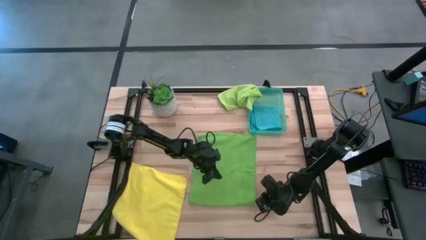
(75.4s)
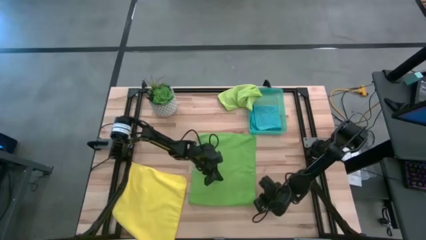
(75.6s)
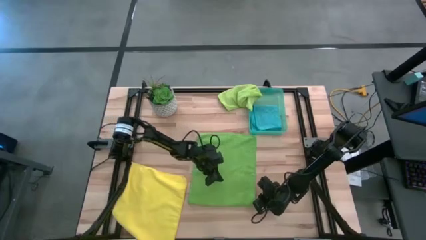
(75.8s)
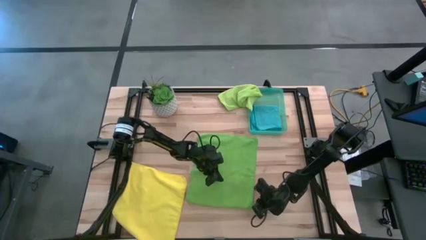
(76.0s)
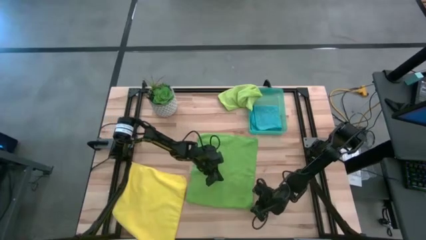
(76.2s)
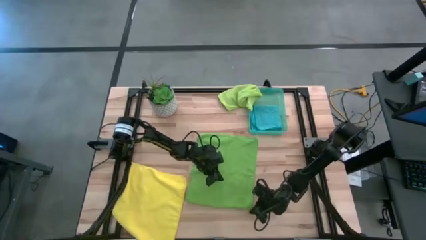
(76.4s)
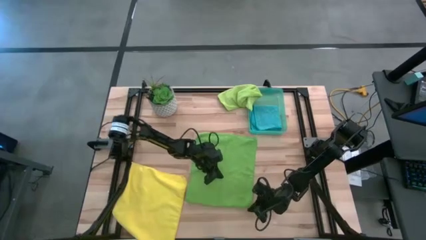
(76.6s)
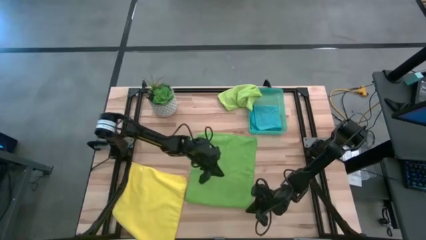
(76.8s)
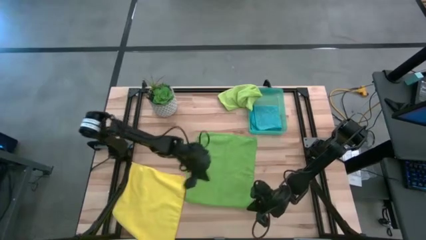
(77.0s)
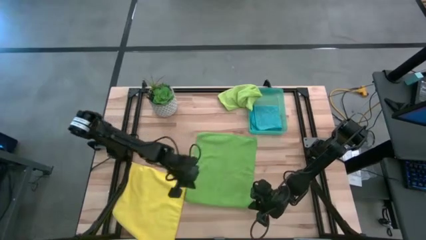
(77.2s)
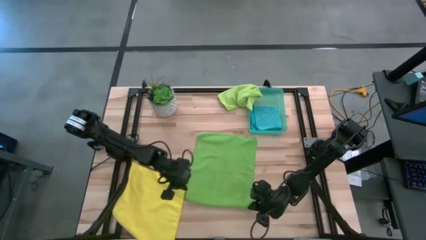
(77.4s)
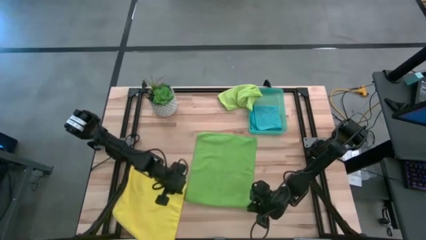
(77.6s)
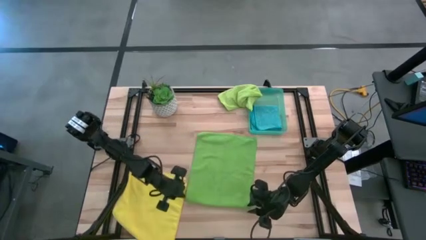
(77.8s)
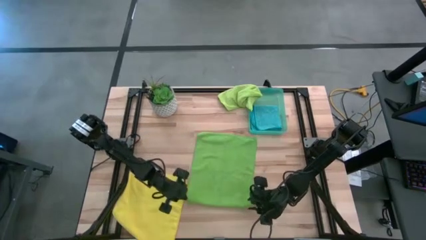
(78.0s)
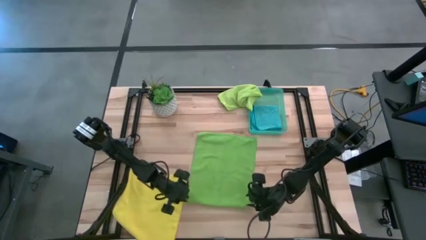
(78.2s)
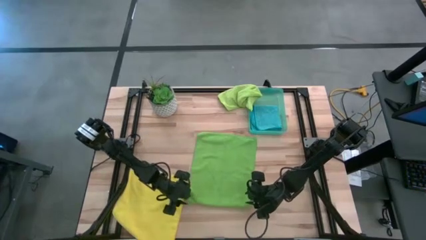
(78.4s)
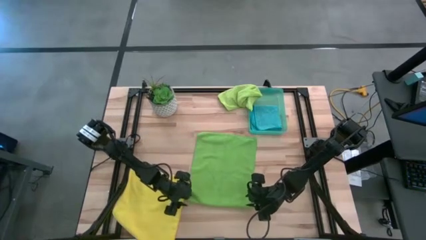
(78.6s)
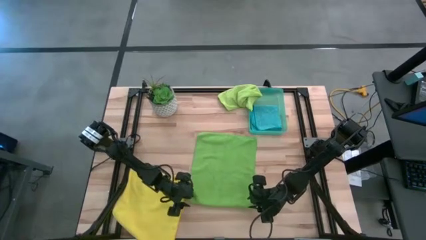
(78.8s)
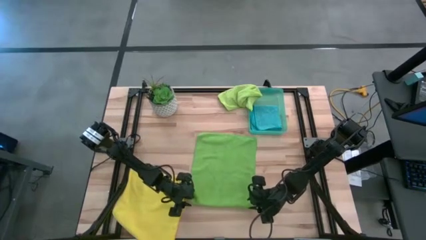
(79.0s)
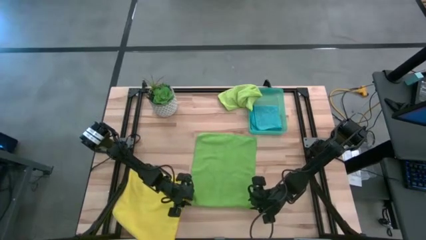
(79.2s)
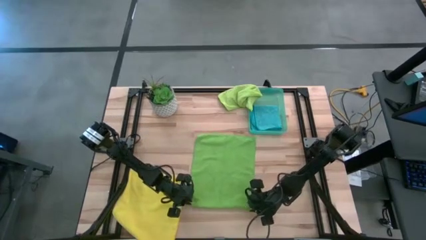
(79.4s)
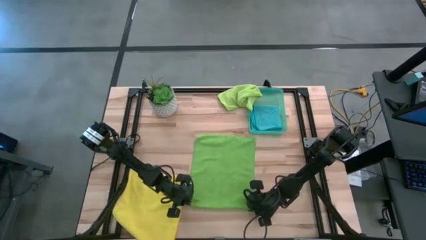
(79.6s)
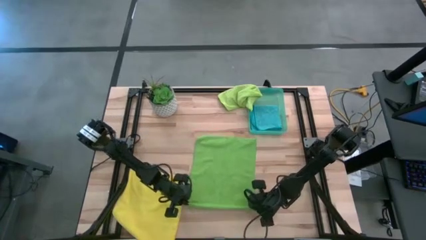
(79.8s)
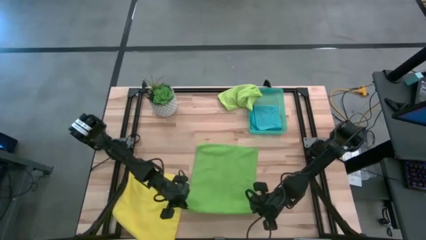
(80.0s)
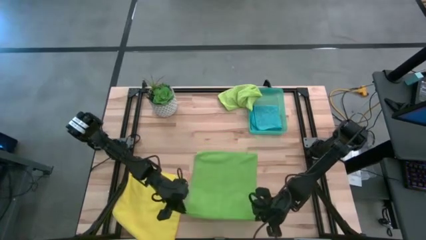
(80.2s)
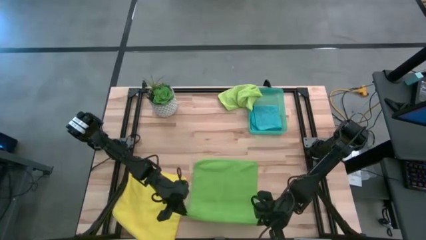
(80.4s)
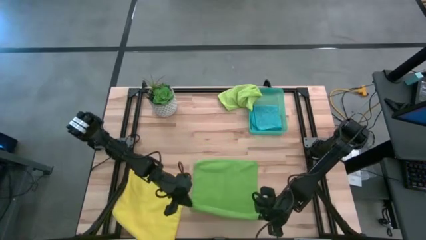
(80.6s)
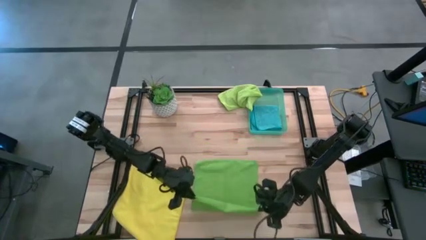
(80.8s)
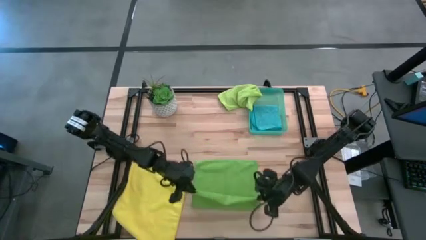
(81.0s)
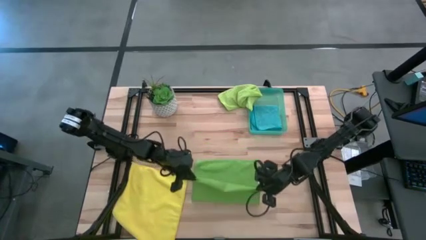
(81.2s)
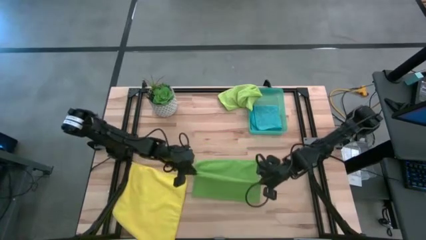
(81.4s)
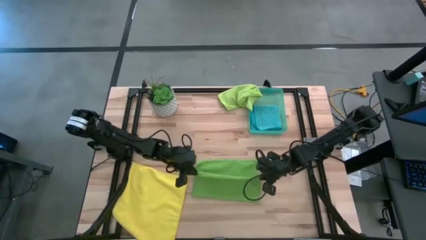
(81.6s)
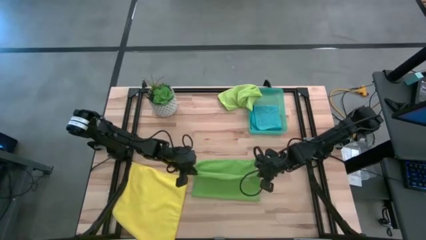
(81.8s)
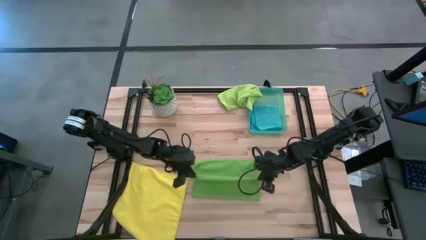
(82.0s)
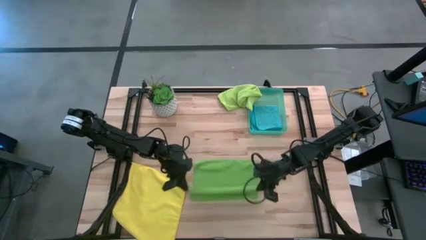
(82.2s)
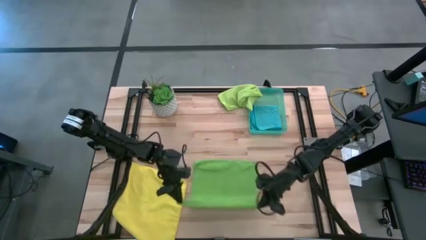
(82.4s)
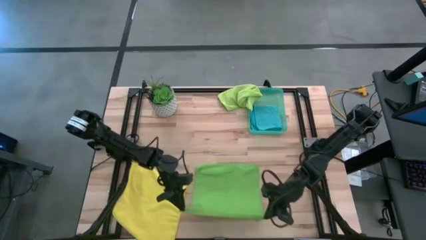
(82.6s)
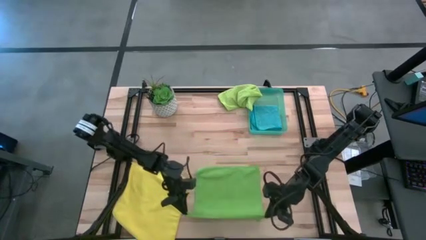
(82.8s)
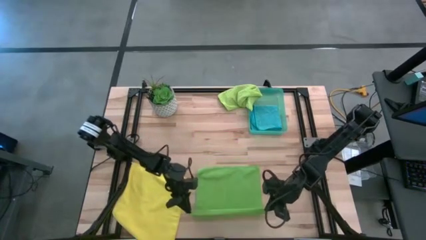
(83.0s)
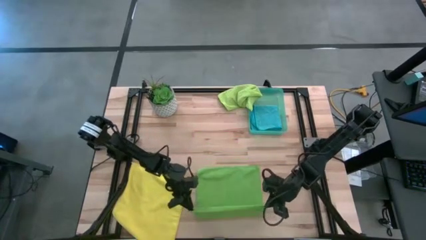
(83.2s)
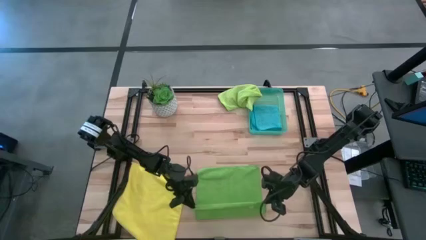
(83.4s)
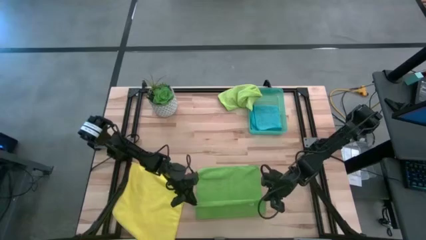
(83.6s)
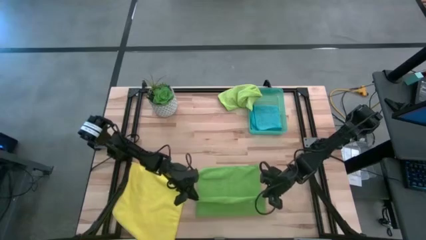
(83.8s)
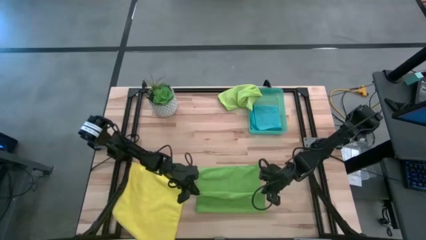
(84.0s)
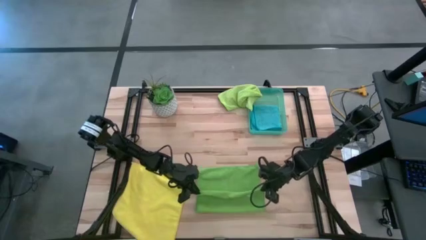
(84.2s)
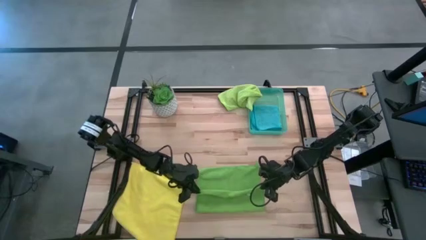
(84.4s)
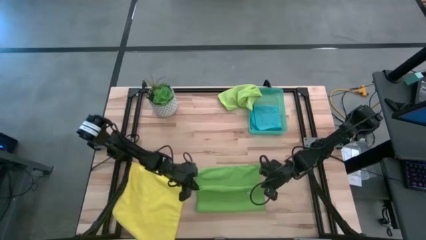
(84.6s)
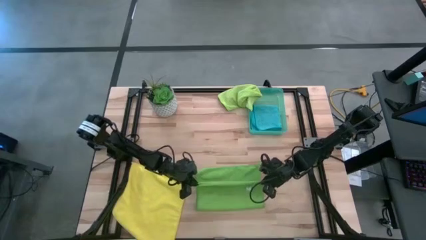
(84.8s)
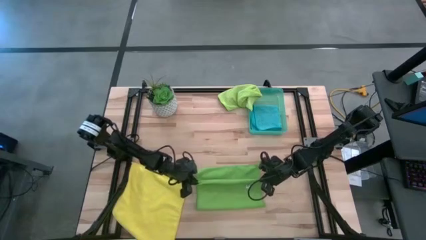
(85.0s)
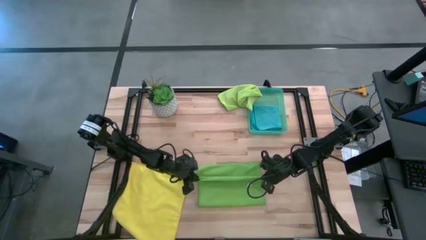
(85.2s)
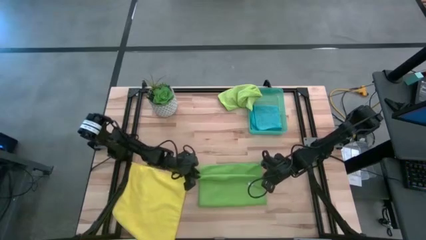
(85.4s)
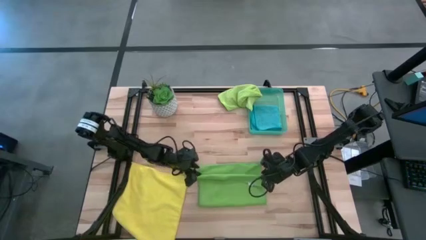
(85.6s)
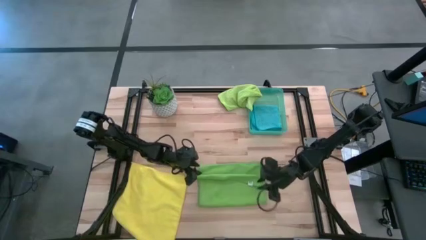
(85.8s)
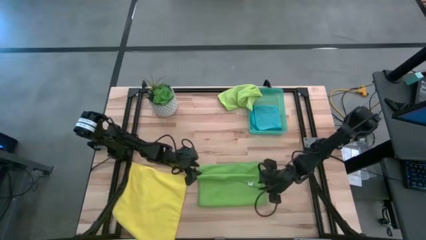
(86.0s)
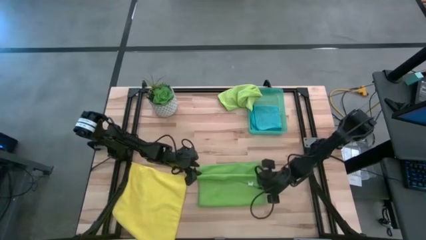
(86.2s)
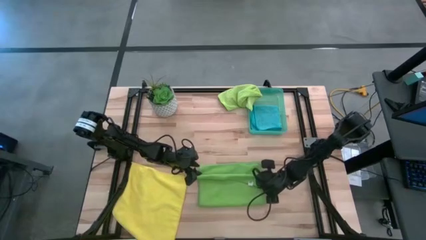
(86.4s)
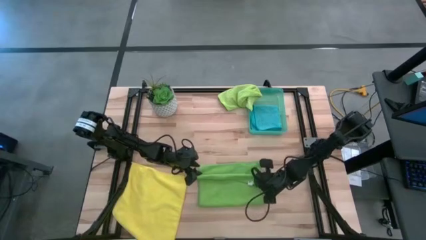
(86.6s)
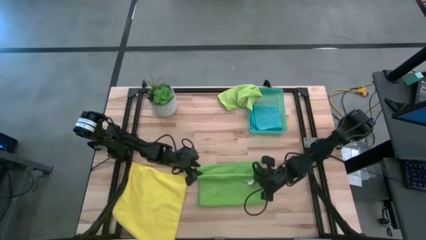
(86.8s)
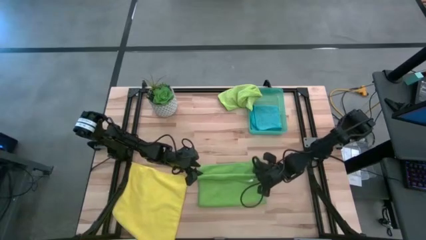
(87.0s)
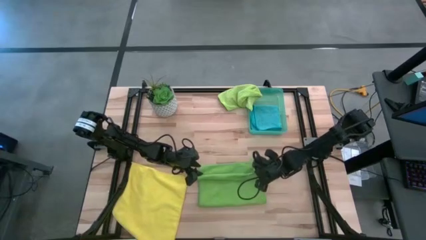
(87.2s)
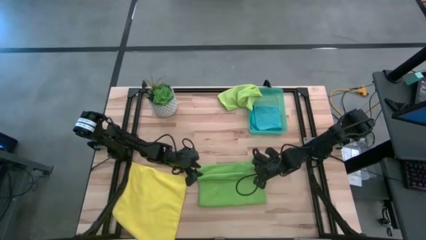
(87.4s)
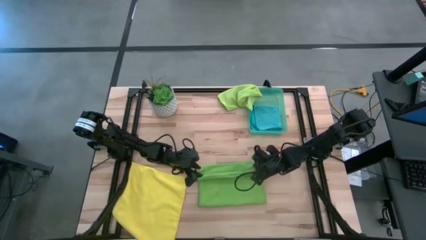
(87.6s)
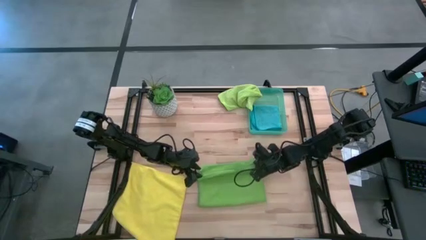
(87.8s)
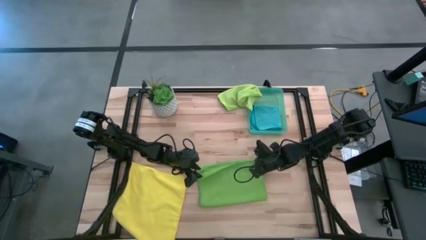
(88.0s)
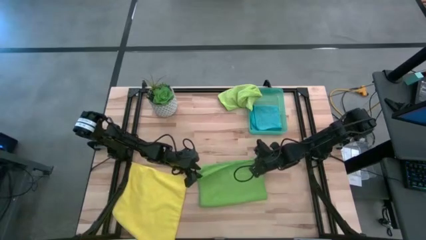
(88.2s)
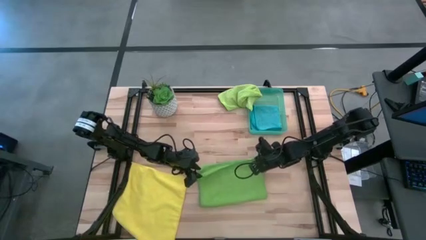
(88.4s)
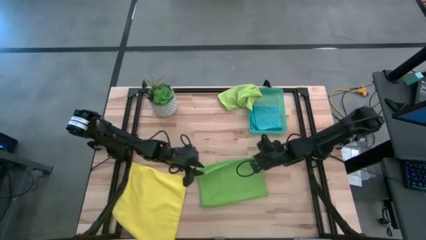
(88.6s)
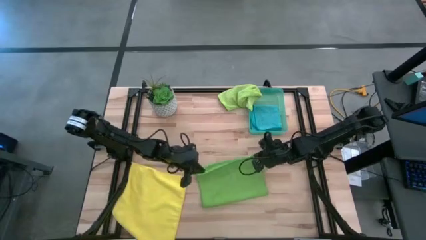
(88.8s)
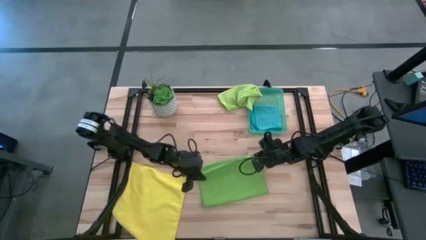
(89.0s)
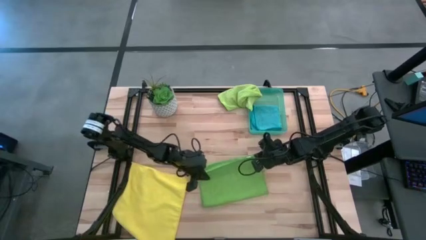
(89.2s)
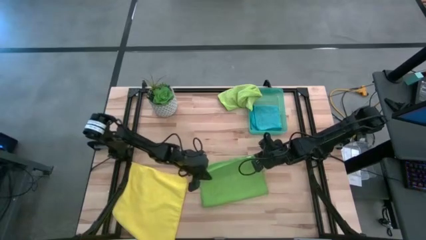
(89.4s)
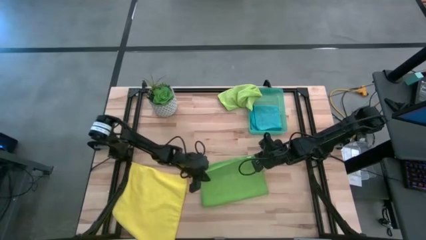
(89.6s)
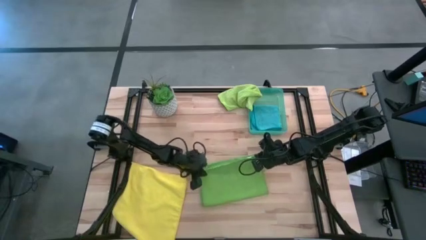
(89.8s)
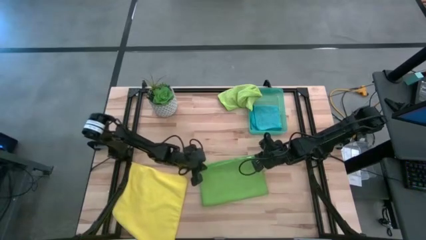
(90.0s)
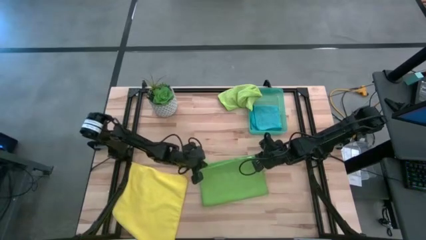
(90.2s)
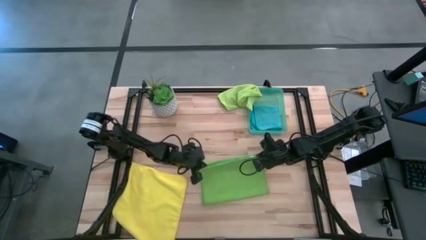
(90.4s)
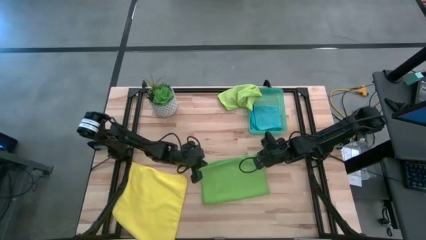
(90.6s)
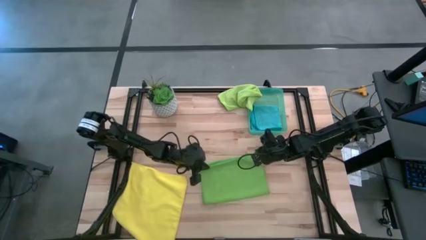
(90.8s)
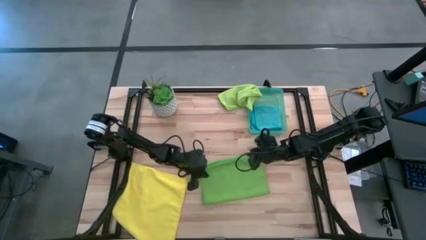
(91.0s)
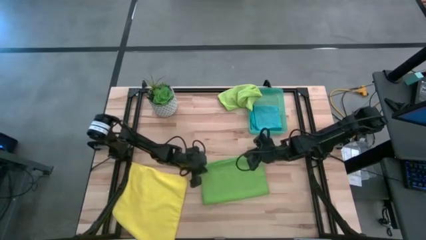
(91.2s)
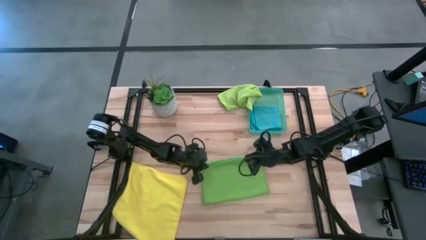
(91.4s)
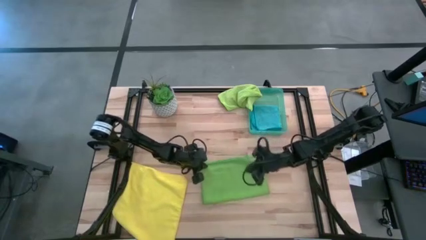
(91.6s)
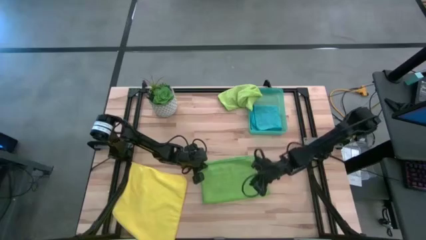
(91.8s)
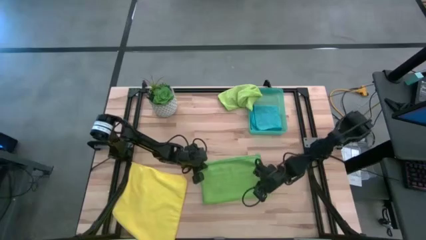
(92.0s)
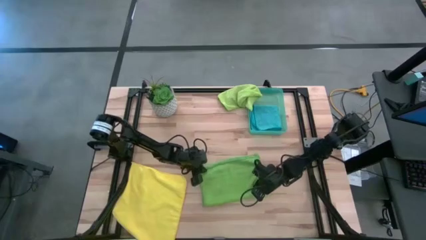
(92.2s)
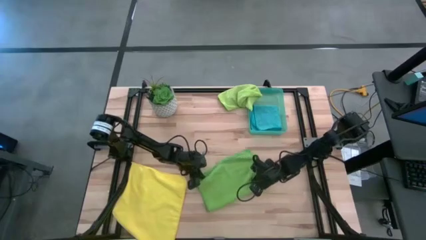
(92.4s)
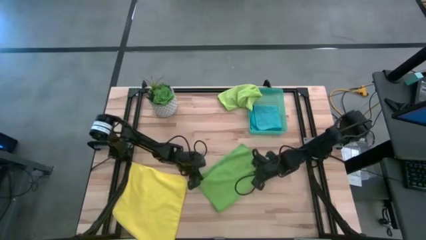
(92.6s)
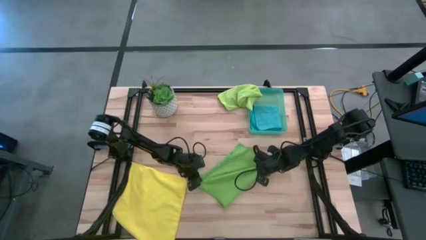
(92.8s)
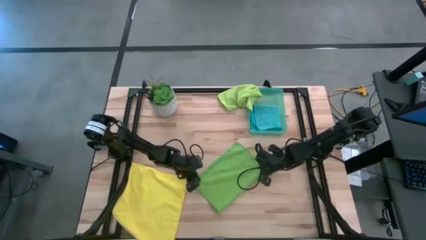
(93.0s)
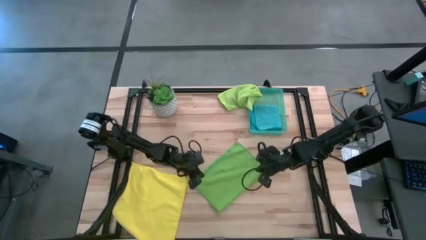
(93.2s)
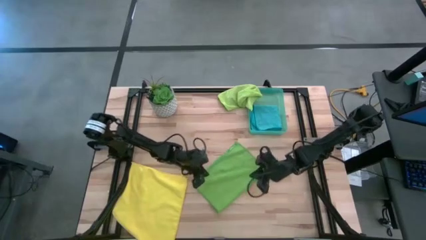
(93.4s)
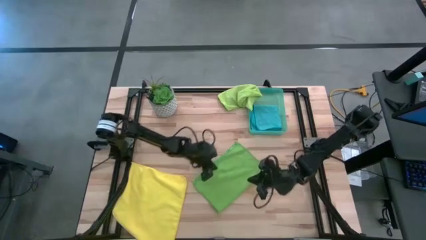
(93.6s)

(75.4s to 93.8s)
Task: Fold microfiber towels
Fold the green towel
